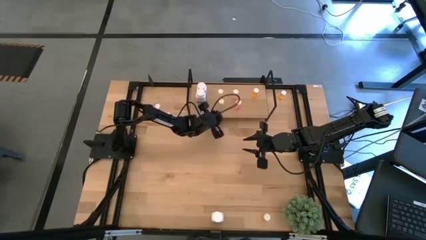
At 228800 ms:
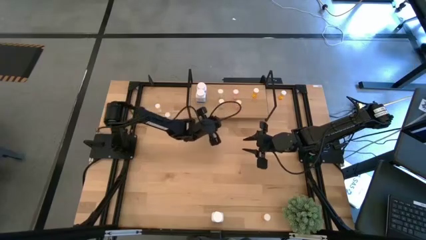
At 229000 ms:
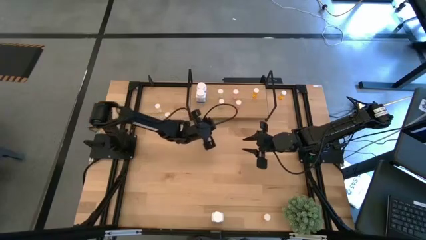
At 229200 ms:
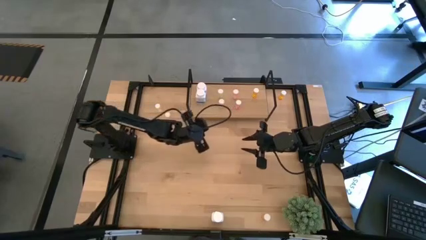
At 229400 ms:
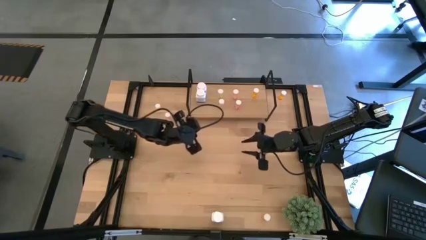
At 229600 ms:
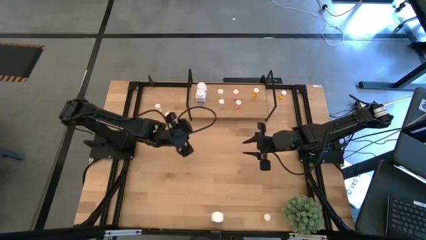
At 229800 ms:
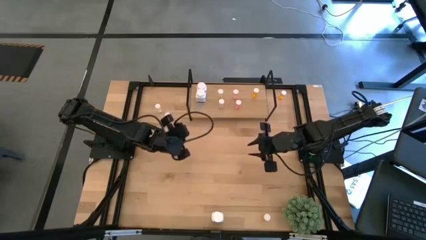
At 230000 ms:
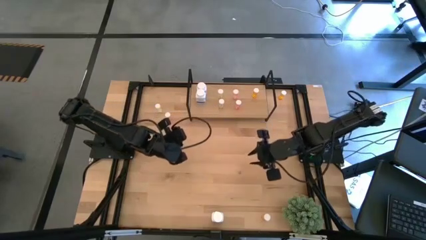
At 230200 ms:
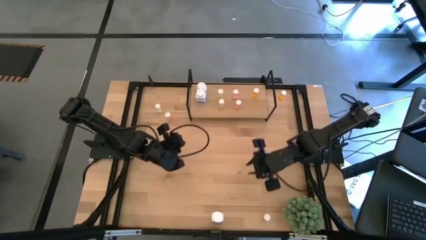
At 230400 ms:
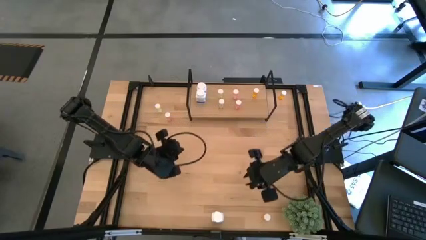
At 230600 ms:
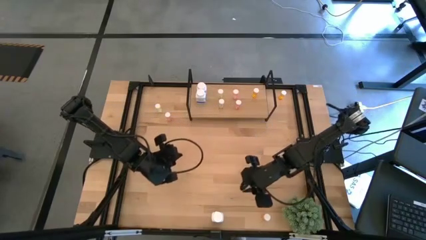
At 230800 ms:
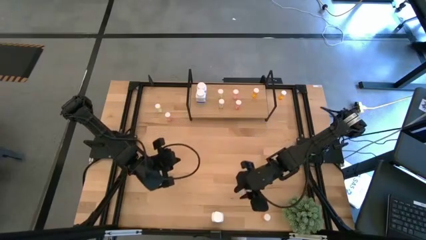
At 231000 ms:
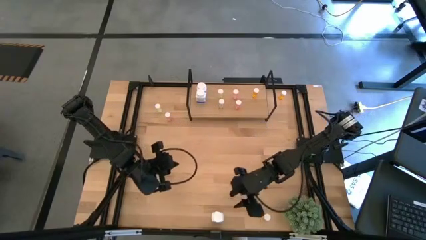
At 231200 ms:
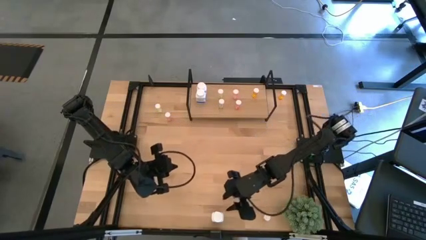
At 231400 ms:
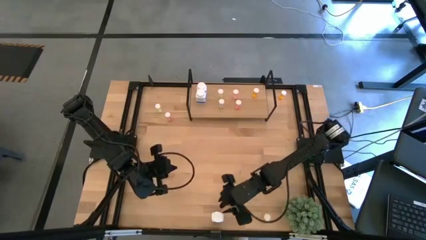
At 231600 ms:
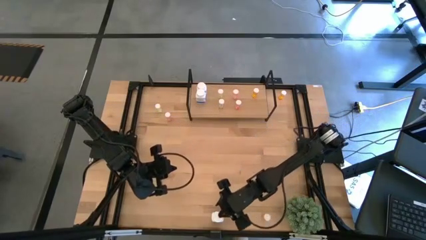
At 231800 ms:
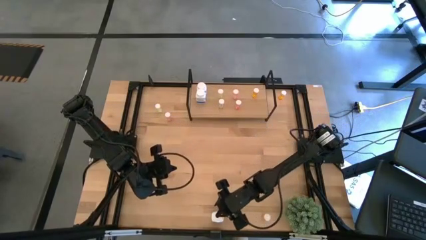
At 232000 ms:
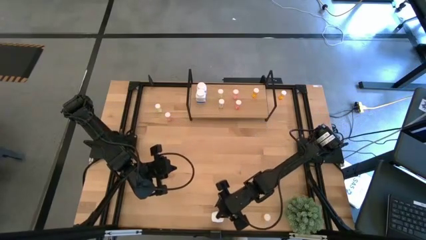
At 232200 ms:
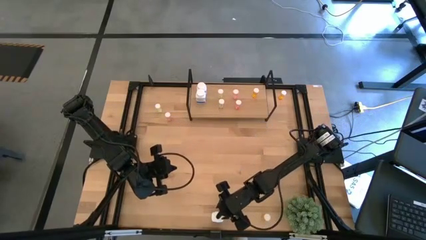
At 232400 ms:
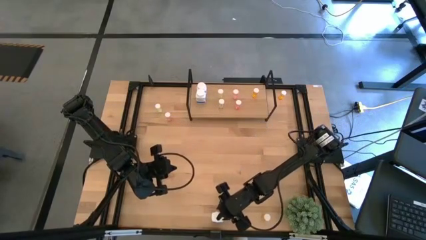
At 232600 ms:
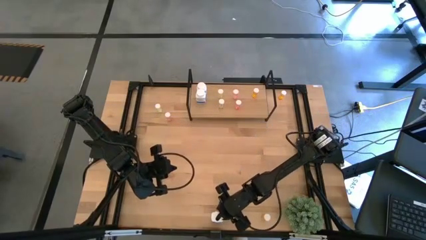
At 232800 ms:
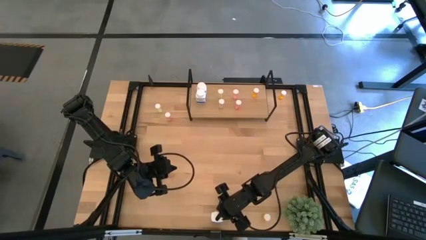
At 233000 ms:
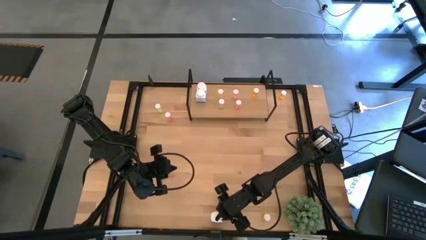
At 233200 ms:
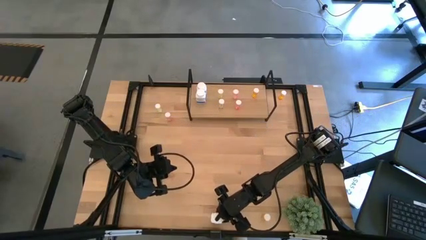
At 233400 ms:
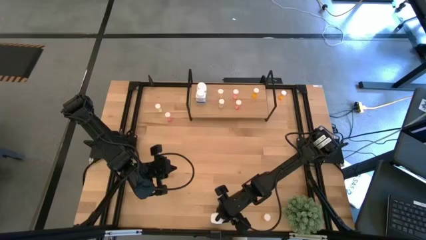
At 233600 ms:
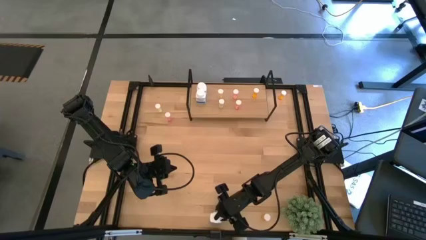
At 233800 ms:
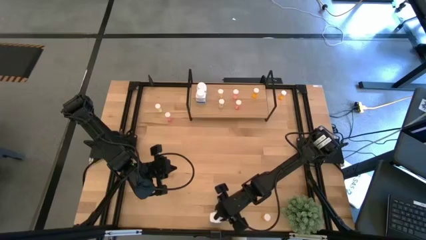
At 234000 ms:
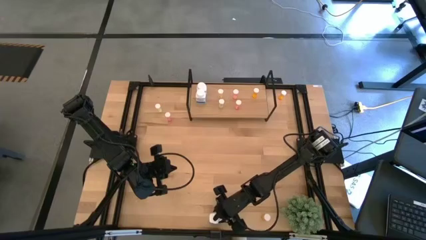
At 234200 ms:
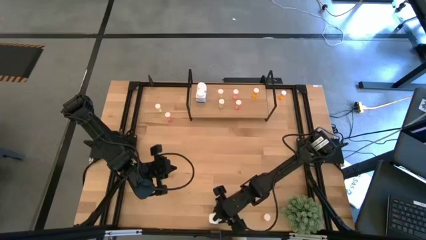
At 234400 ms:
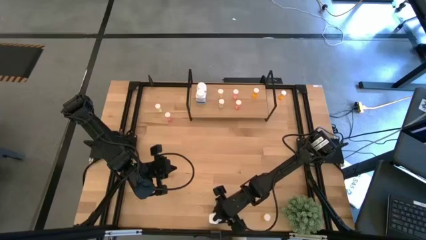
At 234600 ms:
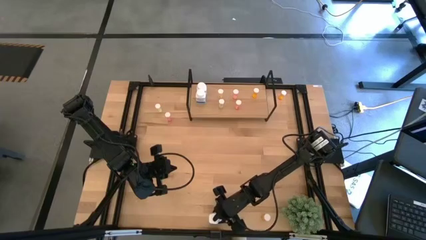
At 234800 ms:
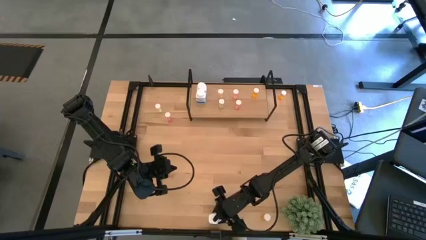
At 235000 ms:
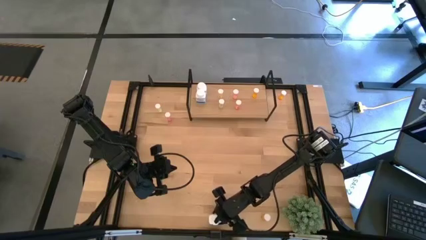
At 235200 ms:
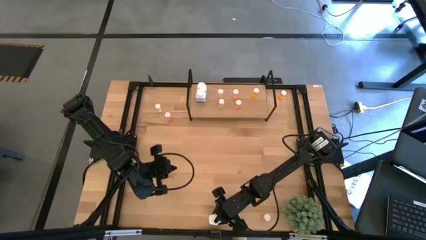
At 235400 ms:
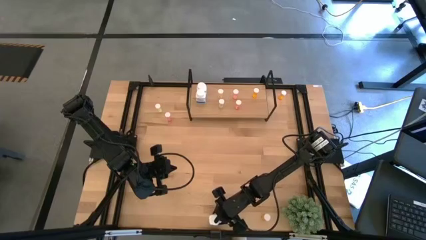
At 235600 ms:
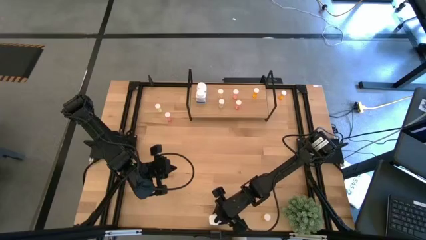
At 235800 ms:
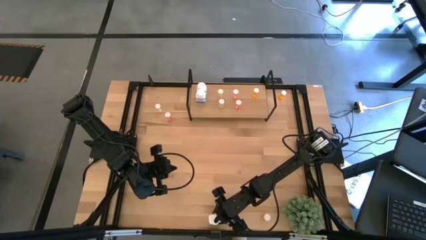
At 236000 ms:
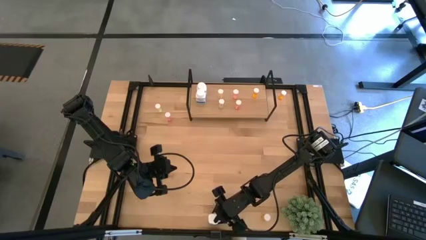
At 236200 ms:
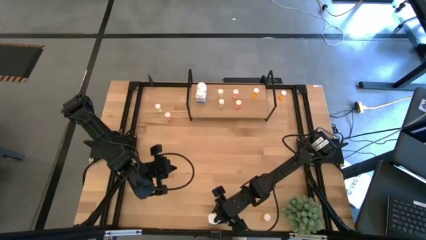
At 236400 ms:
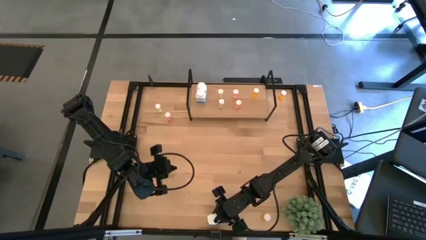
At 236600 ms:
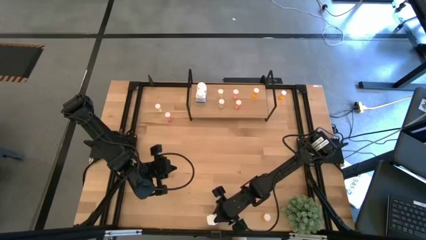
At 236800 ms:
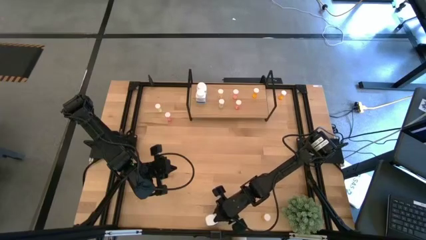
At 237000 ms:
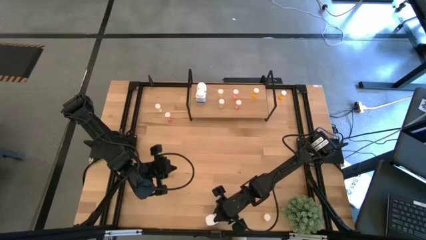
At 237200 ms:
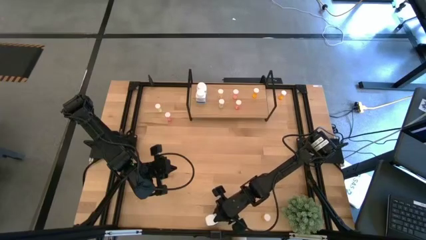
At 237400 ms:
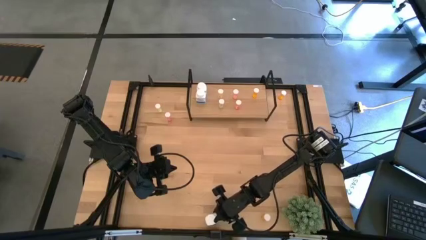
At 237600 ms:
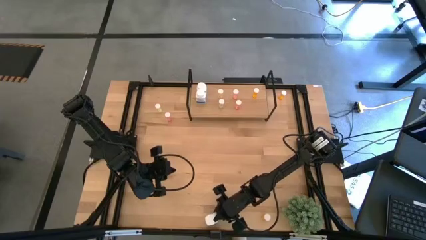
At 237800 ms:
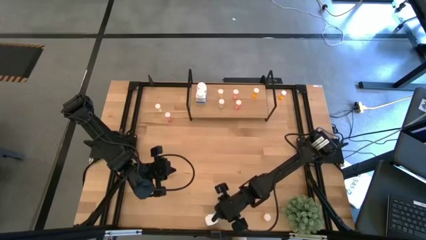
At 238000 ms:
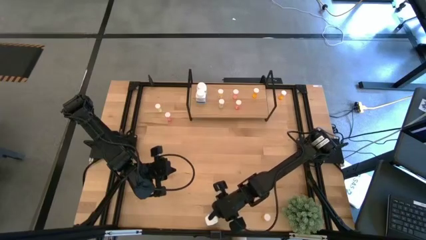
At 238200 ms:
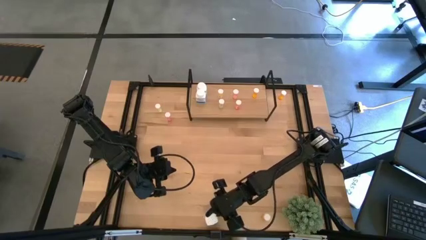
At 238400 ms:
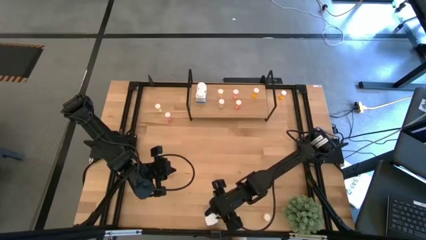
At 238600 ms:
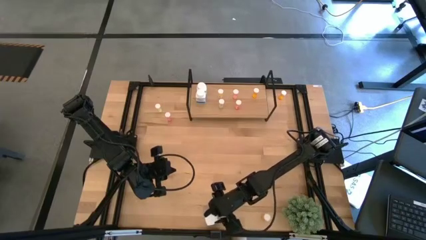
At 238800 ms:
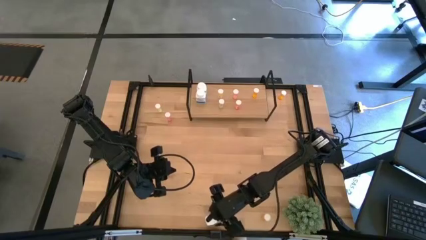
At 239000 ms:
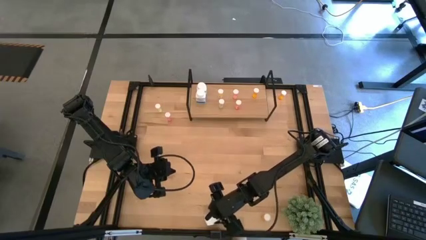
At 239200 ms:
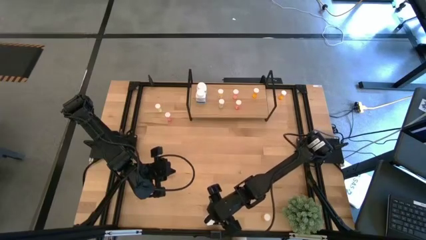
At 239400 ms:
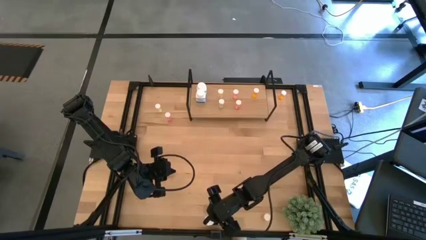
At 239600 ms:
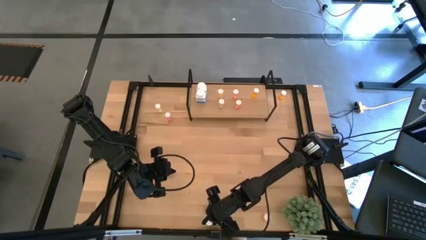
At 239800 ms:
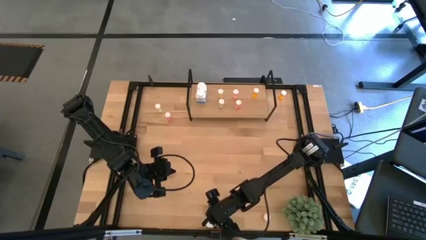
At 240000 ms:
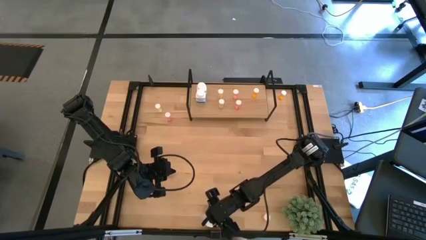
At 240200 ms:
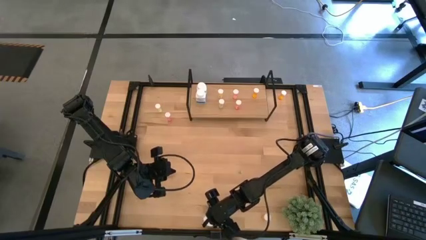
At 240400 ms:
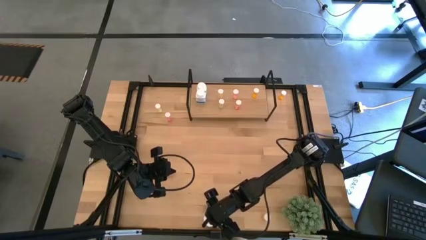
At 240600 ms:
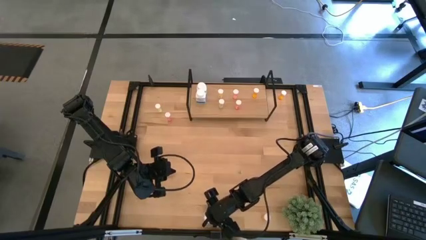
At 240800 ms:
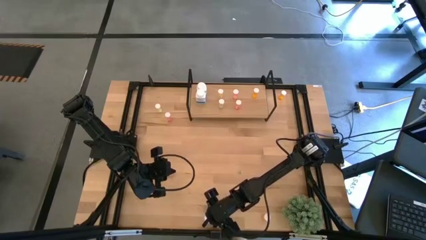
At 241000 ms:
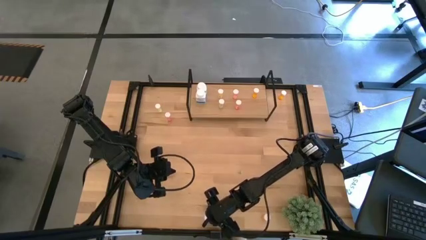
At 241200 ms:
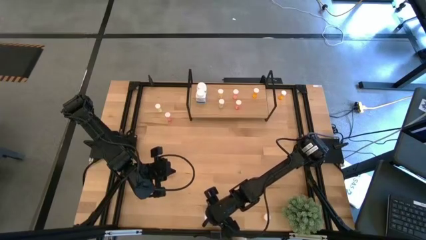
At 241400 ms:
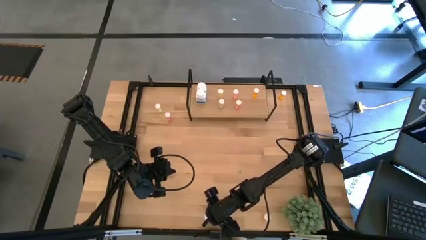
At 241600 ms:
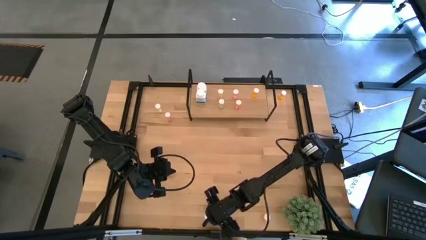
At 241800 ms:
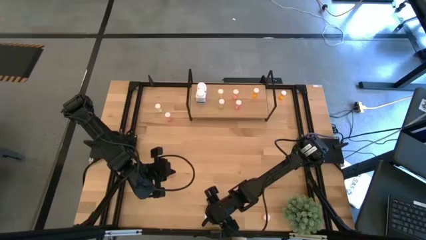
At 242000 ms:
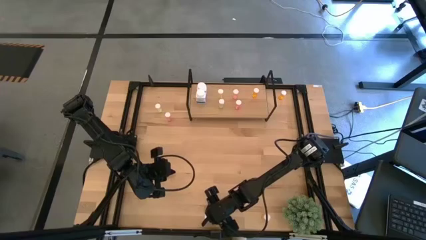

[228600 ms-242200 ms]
Task: Pick and place medicine bottles onto shelf by color
Put the white pill bottle on the shelf aligned with the other white pill bottles
